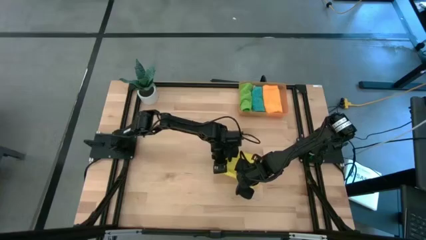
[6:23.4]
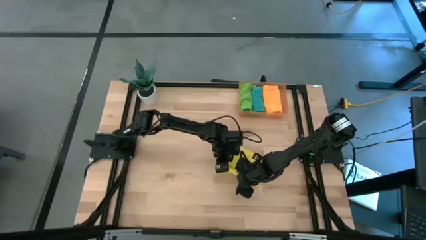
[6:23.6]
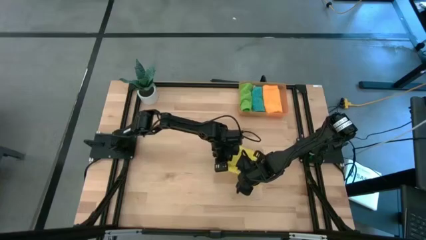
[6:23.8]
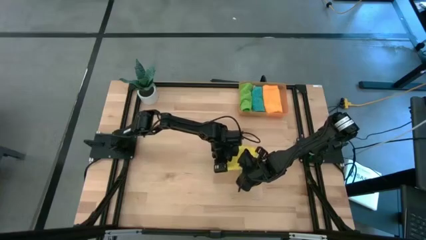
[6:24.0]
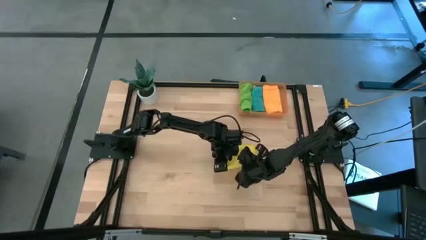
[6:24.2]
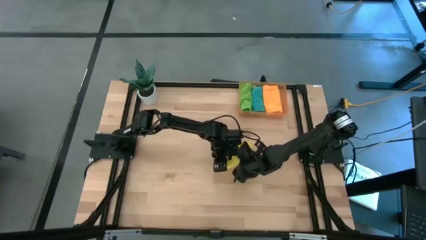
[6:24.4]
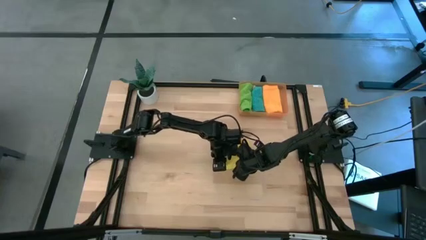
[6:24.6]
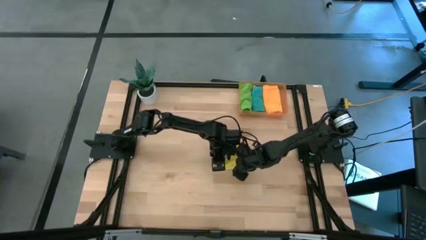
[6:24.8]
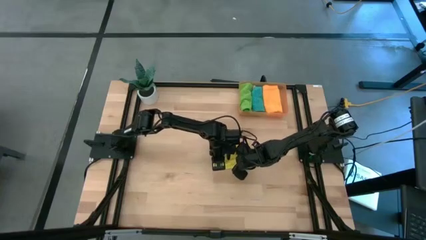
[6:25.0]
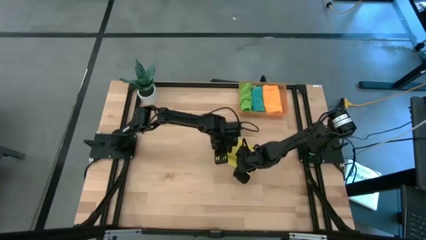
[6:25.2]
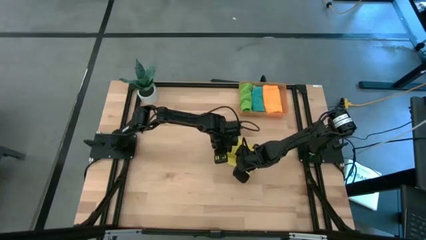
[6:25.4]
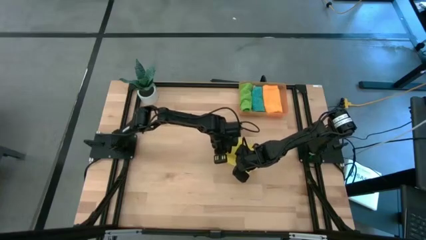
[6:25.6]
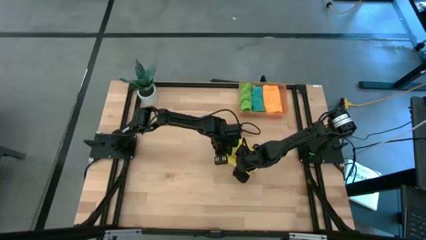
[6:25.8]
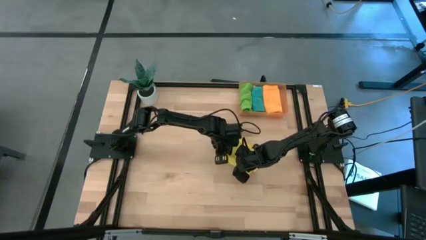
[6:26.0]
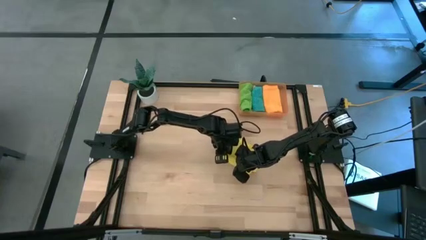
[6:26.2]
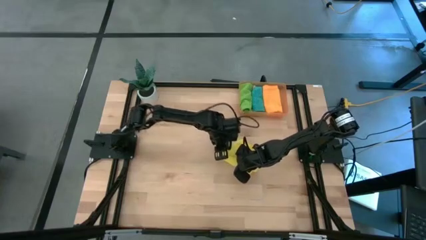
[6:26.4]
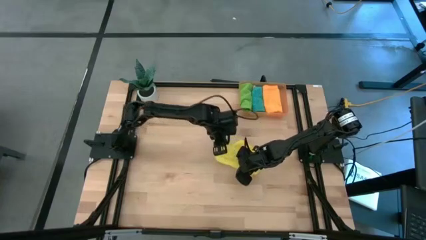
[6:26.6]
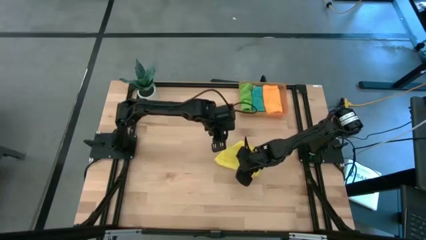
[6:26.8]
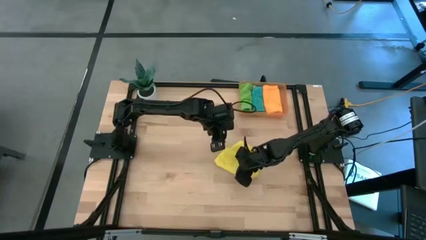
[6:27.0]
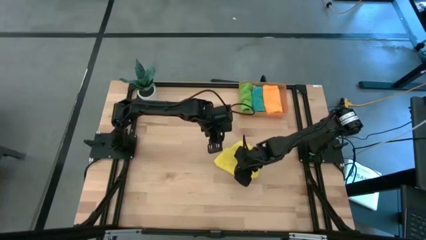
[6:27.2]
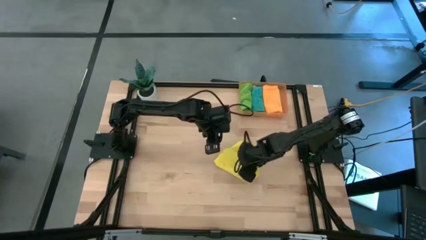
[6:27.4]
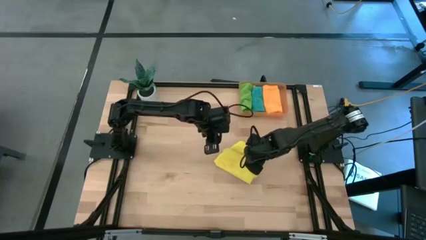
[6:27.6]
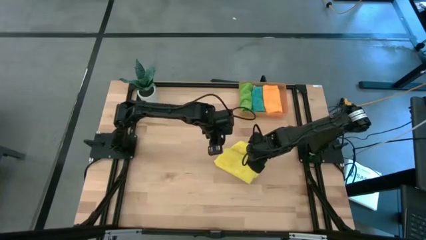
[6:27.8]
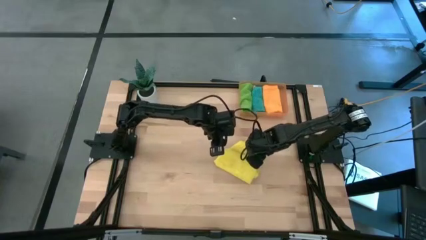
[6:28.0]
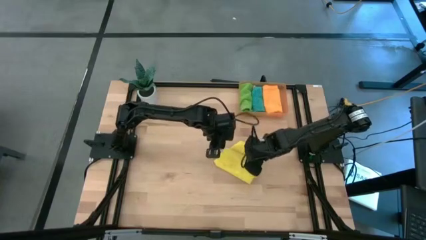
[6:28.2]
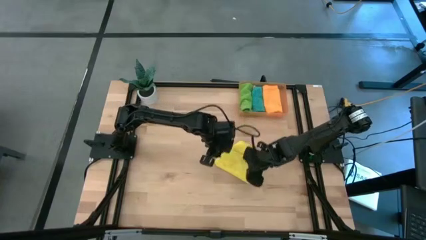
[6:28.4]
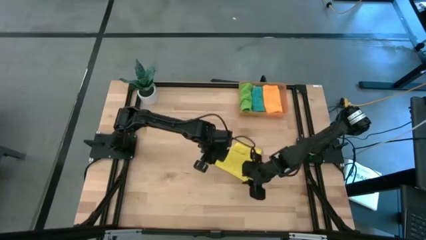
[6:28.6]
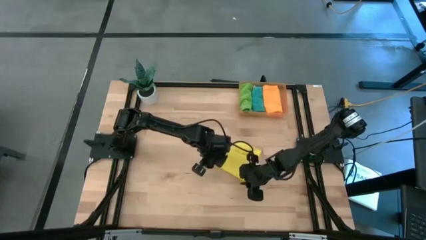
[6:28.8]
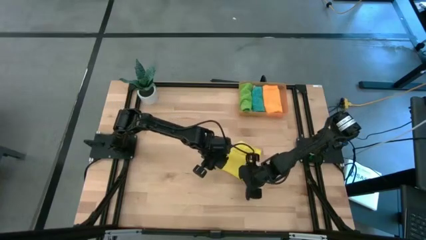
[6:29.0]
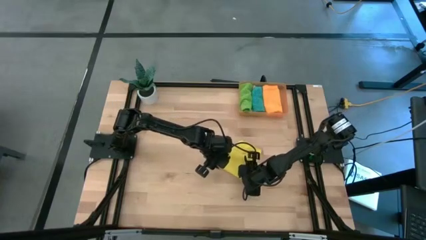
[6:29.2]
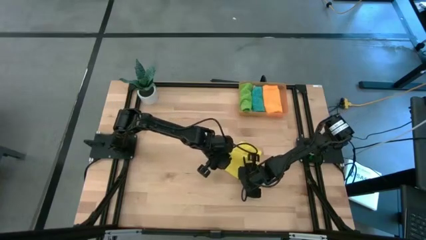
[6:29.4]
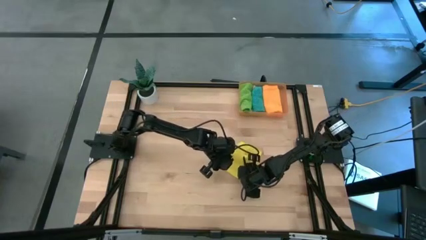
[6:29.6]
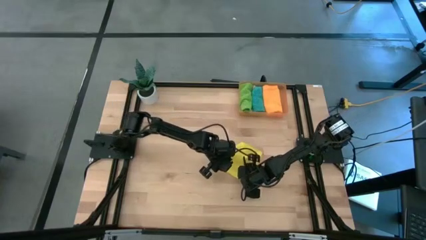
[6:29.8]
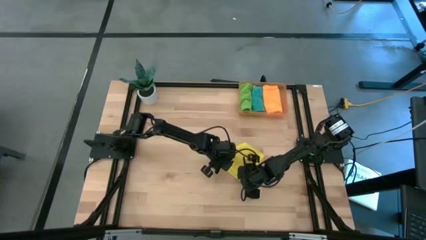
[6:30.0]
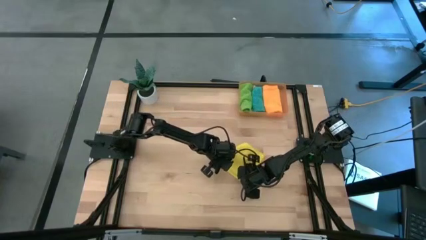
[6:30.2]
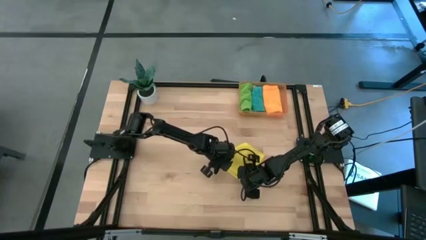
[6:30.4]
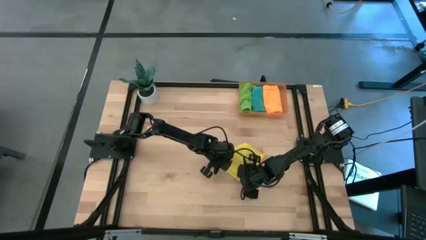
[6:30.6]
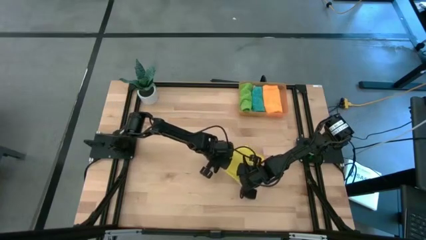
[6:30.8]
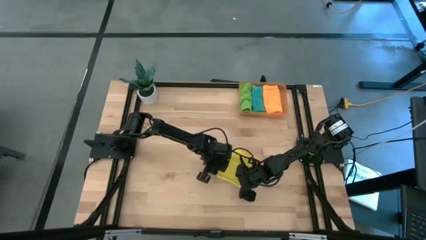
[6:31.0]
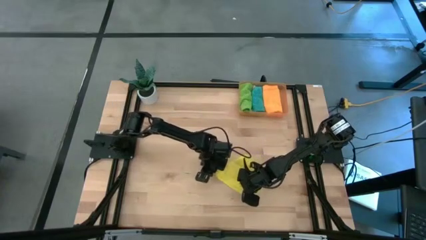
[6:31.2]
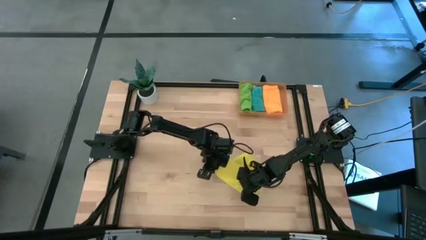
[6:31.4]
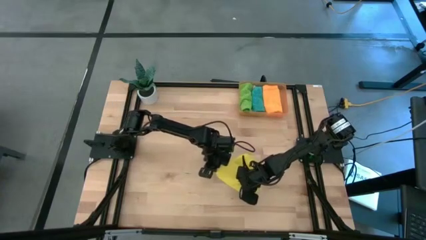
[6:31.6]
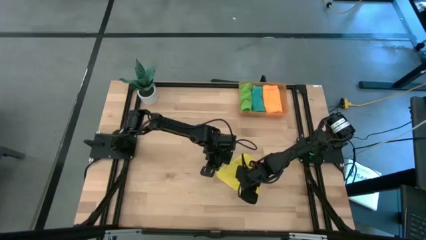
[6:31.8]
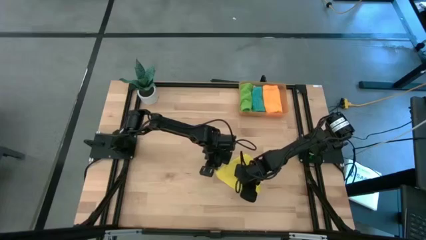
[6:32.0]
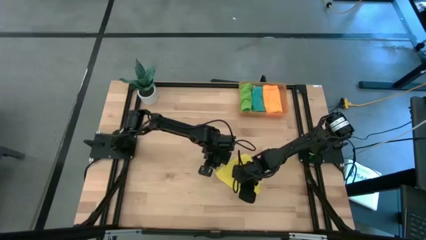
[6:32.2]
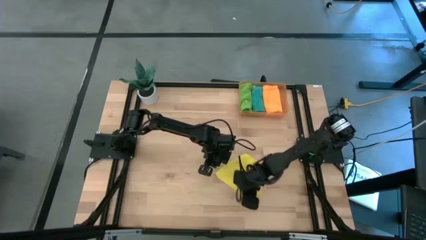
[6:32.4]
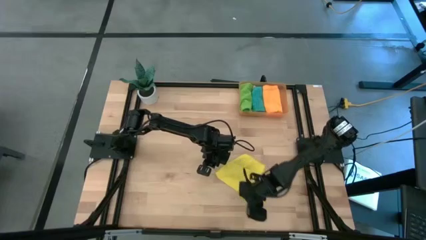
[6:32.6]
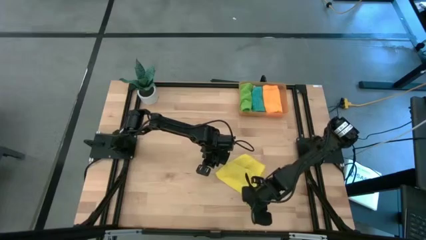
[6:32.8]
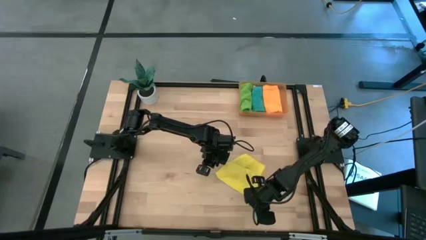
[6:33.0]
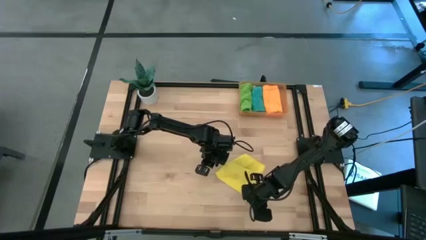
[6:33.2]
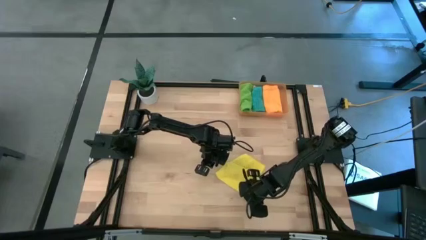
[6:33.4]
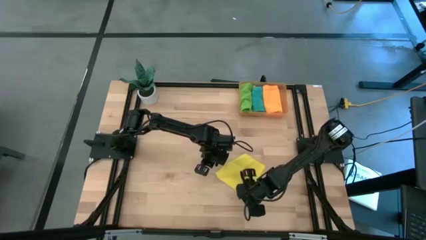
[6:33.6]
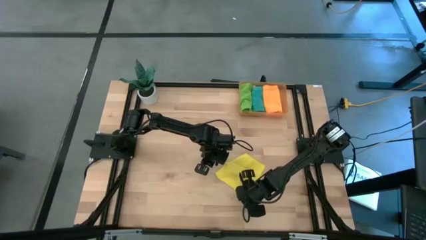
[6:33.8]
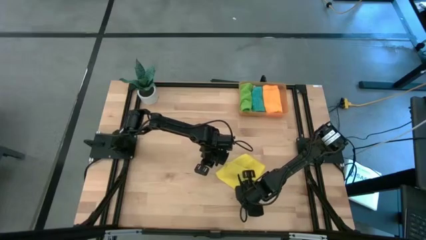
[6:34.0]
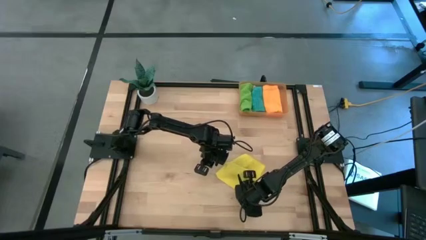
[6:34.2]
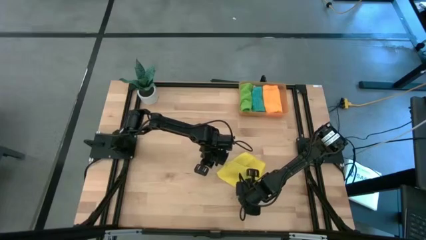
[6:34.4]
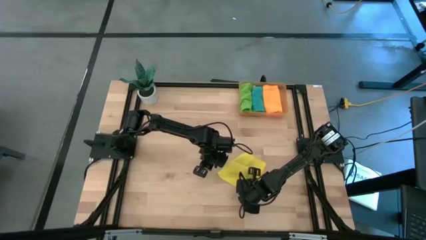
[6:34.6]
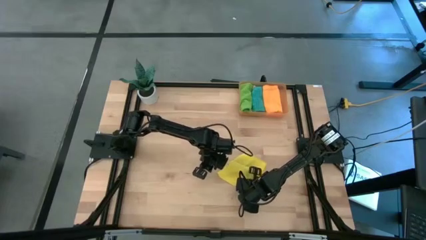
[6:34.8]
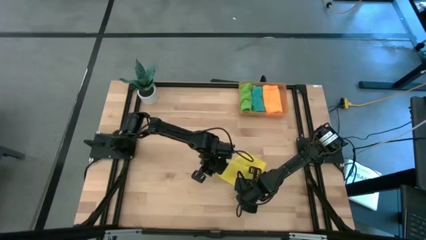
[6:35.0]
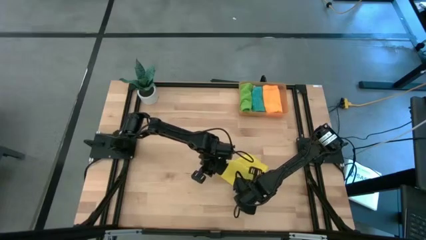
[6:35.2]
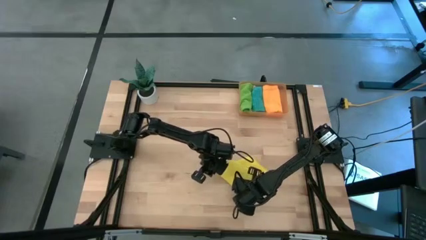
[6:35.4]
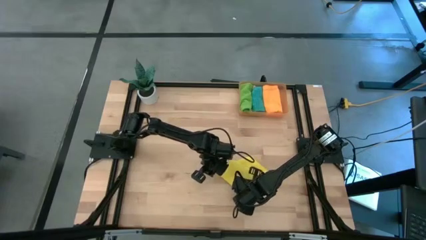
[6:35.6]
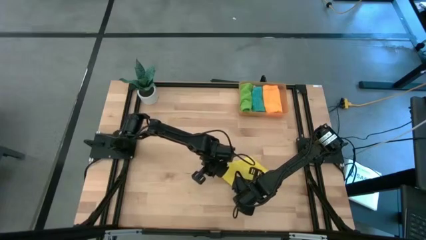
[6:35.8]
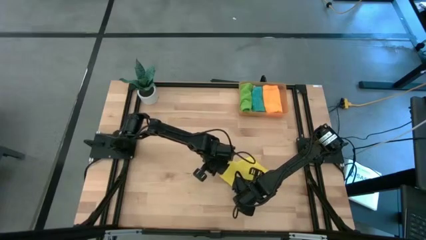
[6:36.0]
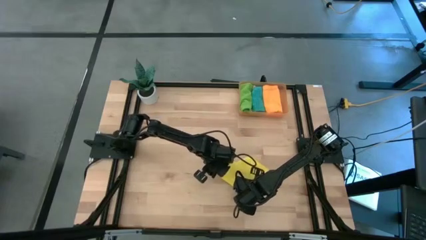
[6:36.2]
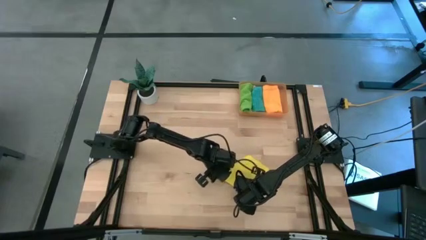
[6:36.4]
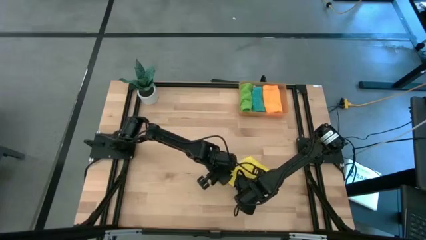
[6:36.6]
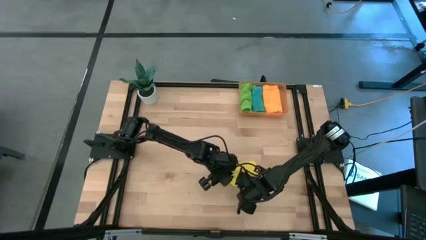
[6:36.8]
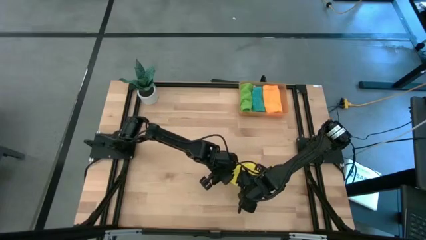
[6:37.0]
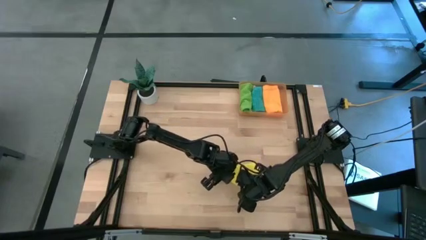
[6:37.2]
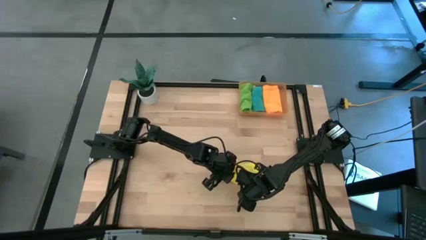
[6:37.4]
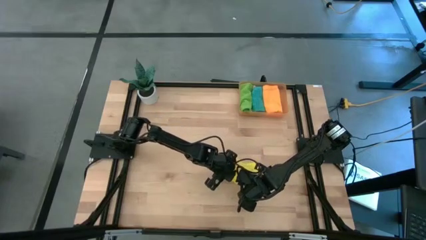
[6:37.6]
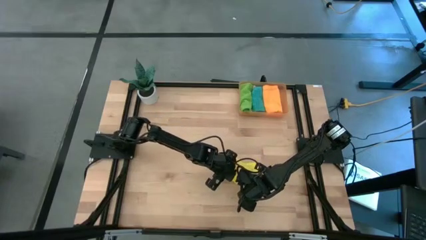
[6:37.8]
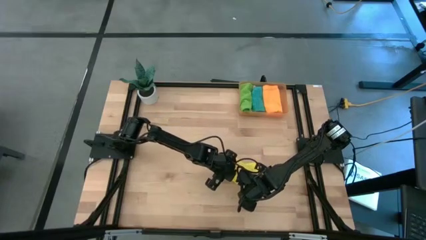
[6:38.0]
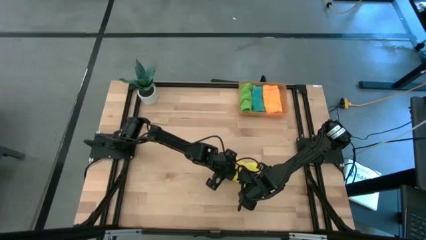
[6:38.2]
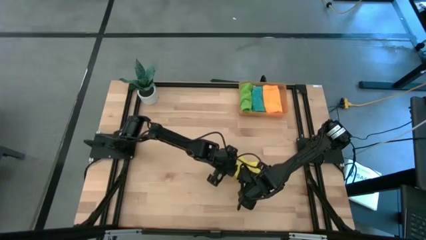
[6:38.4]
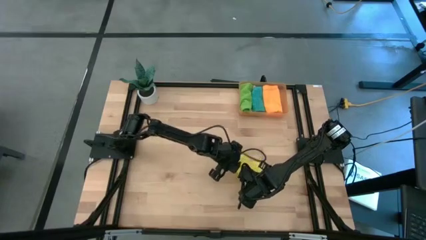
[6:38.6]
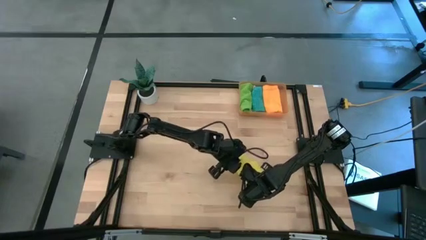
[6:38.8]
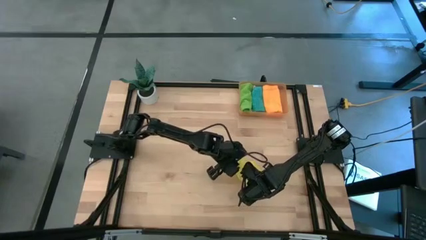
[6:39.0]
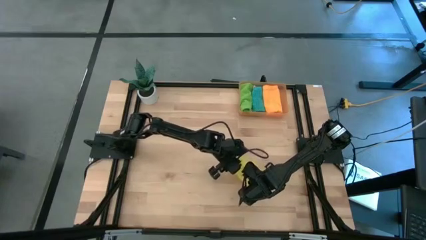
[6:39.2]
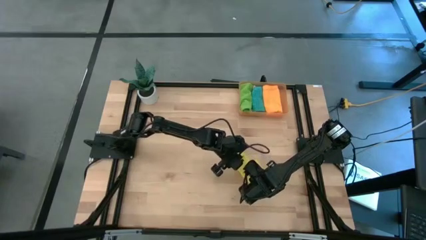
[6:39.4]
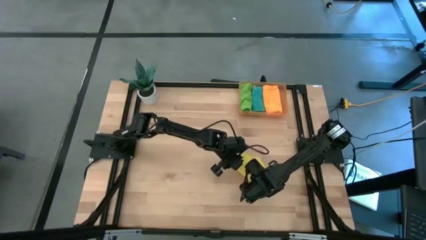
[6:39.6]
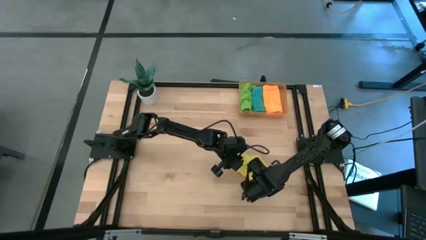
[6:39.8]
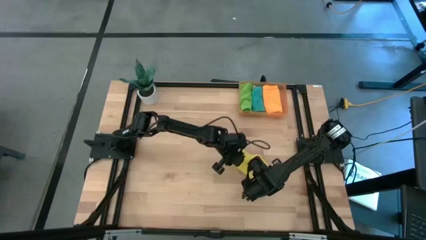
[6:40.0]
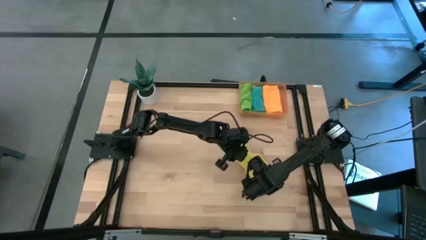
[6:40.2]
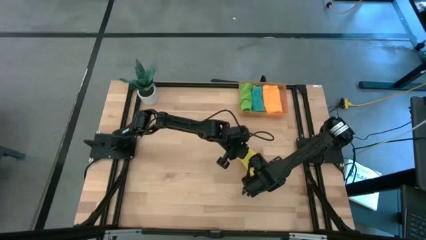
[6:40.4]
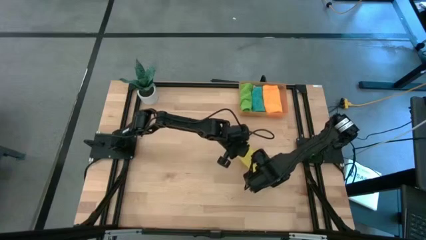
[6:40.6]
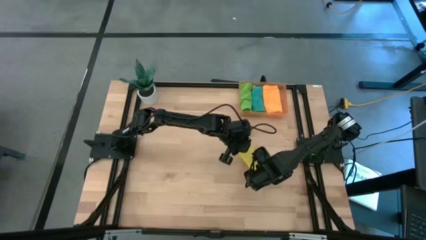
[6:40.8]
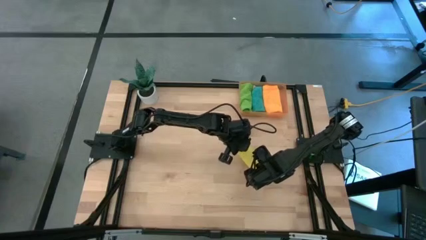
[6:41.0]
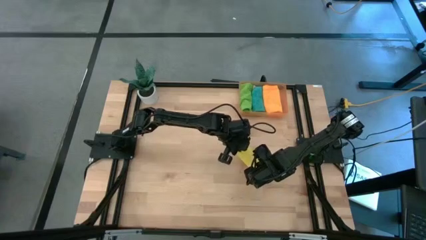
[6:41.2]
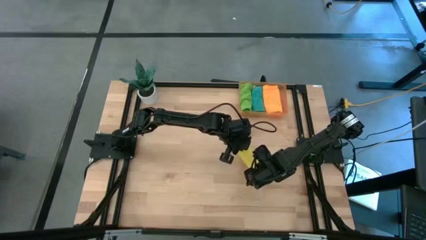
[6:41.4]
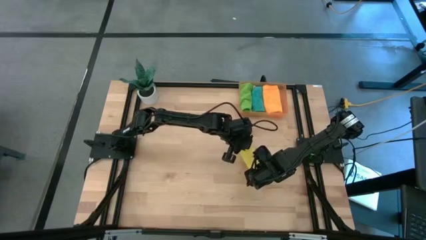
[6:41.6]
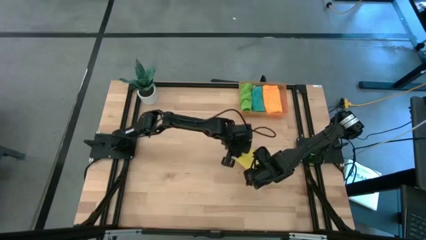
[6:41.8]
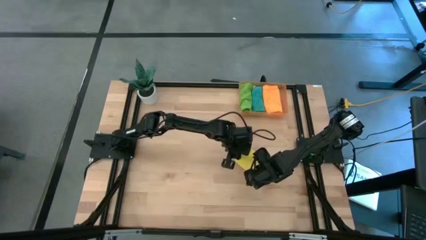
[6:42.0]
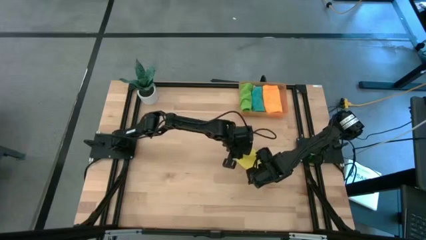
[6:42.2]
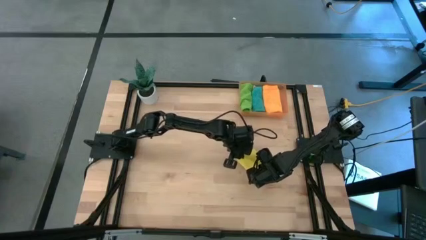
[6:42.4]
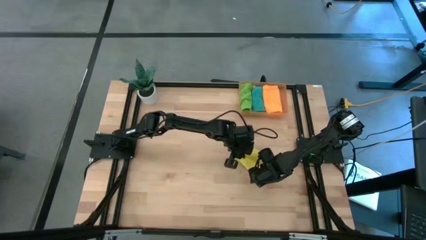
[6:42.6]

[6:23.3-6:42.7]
Task: Roll microfiber towels into tight, uniform cylinder then place into a basket
Fold the yellow towel
